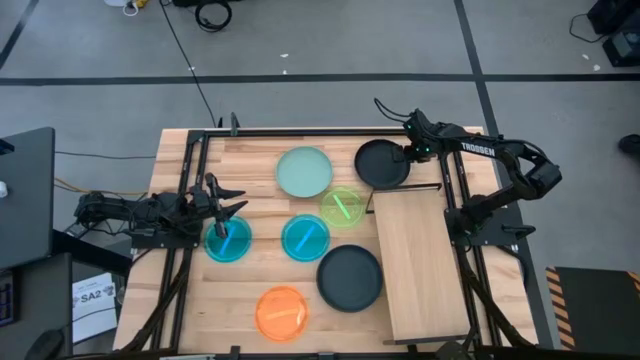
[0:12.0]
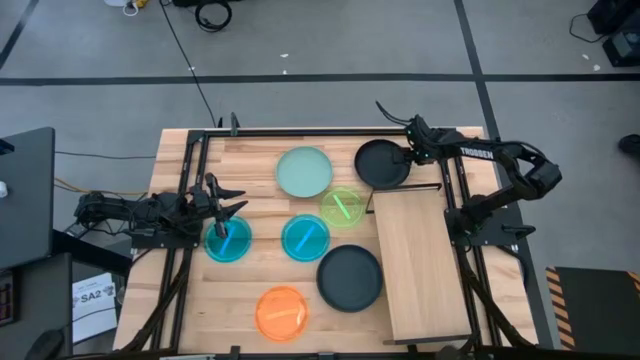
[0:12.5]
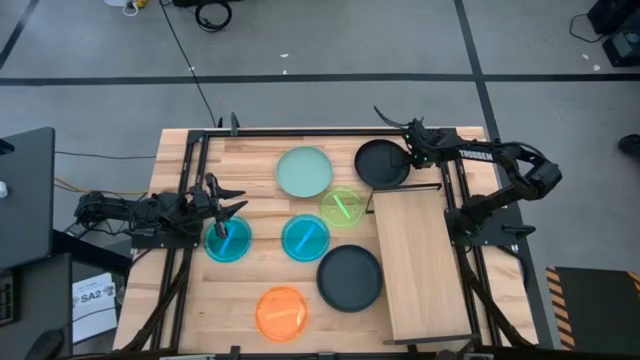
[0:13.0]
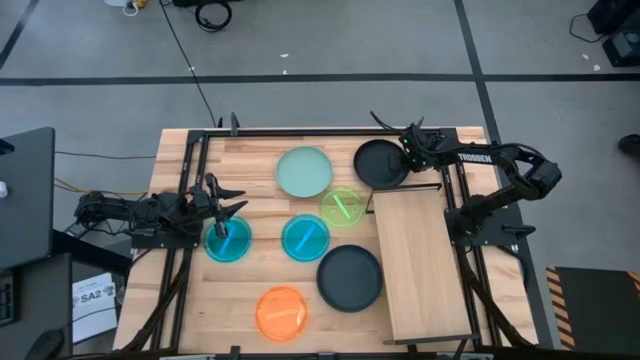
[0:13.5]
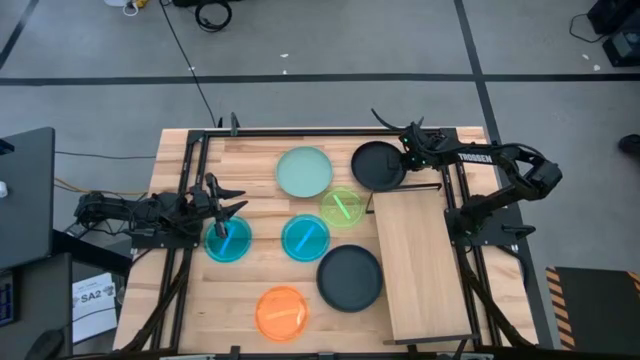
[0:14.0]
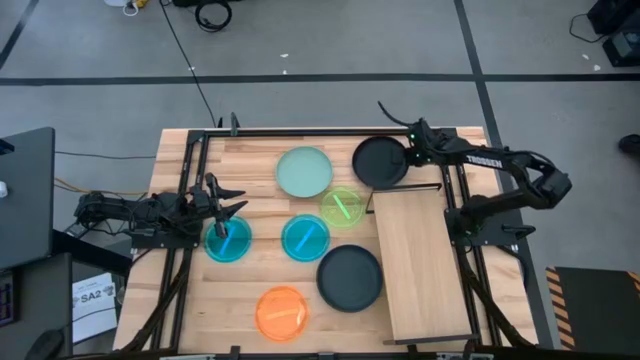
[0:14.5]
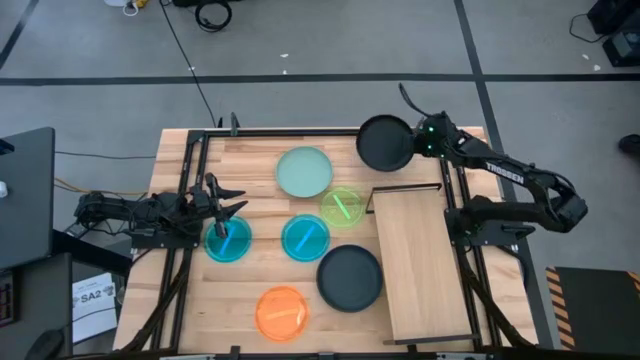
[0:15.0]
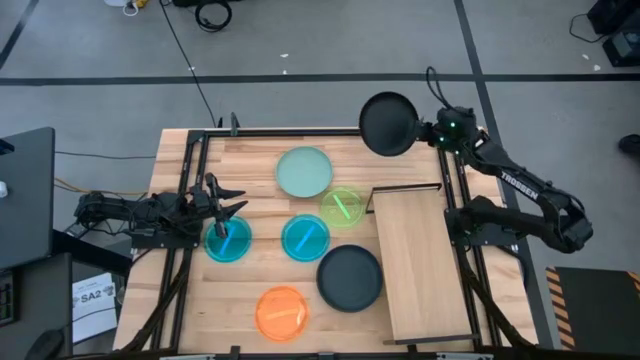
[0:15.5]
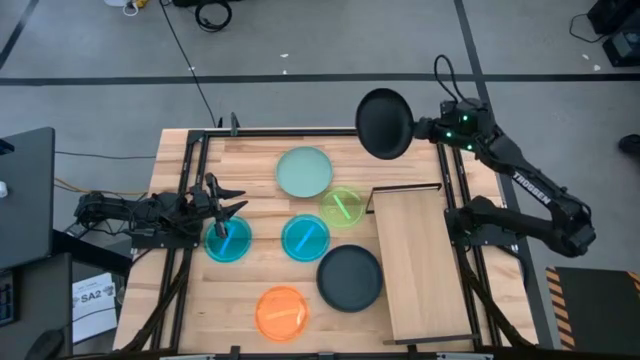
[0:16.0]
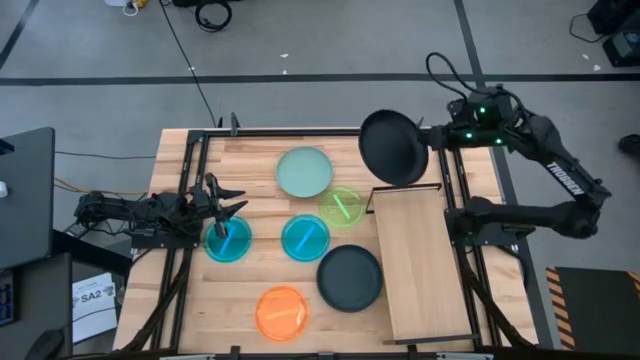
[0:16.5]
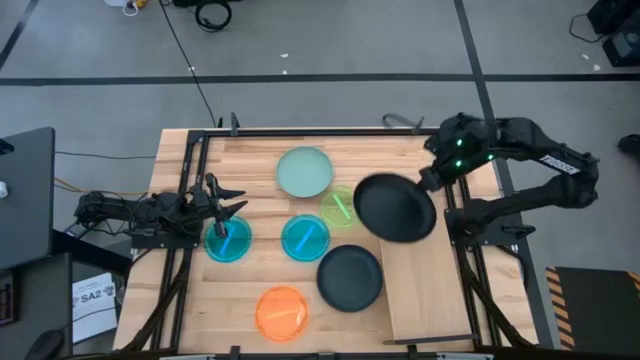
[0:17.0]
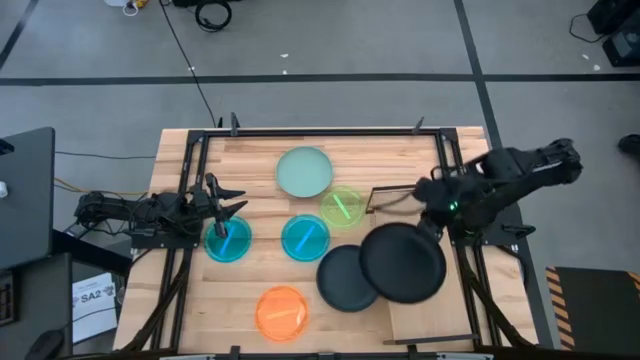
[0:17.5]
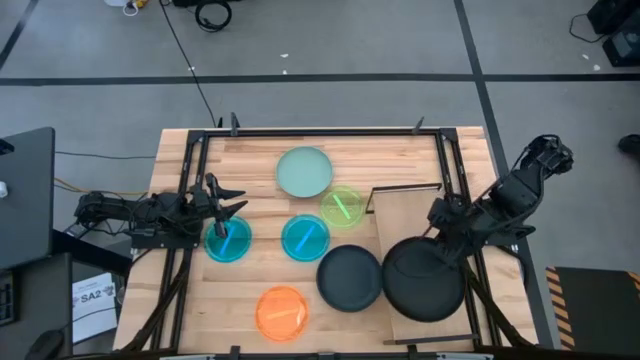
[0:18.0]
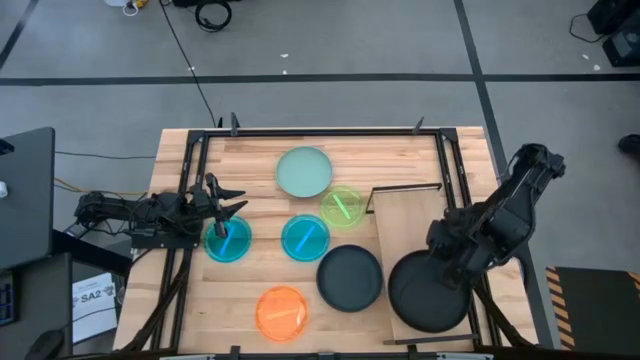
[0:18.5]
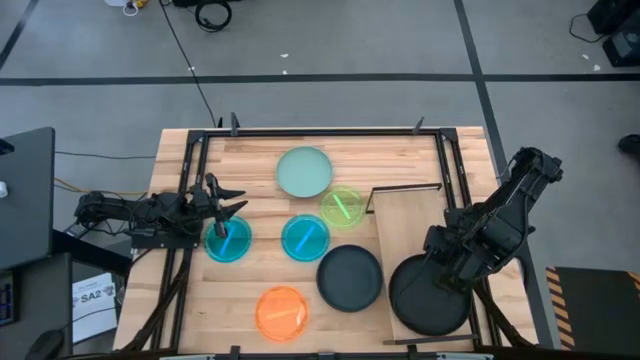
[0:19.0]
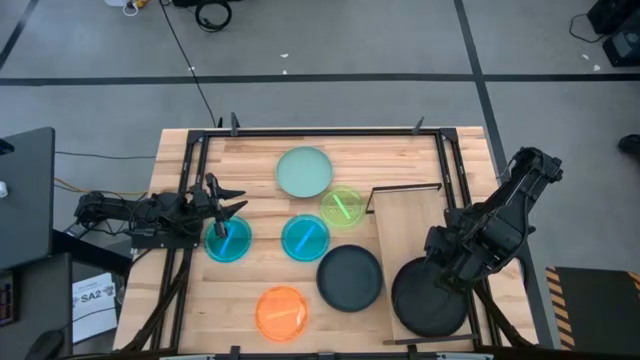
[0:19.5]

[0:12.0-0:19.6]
Task: Place and stack plates onto a shelf
Put the top black plate on the shelf

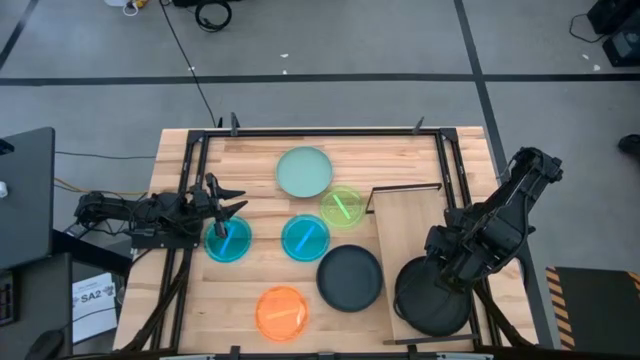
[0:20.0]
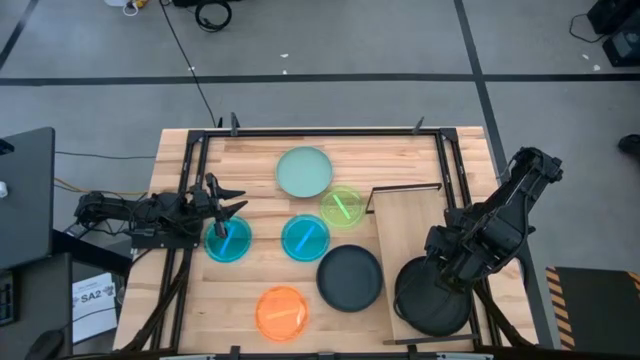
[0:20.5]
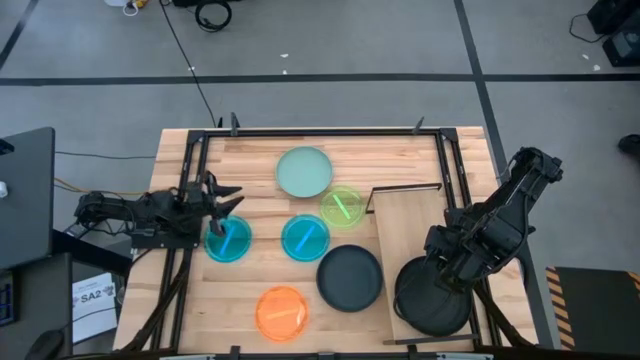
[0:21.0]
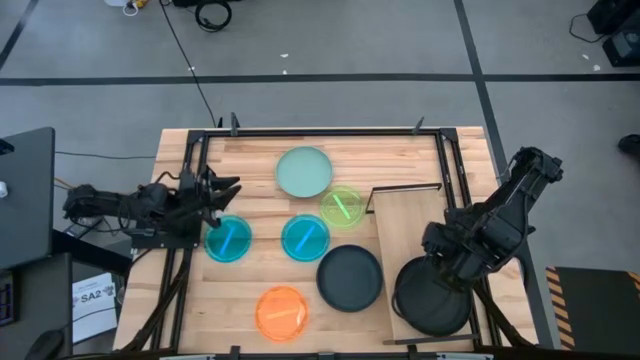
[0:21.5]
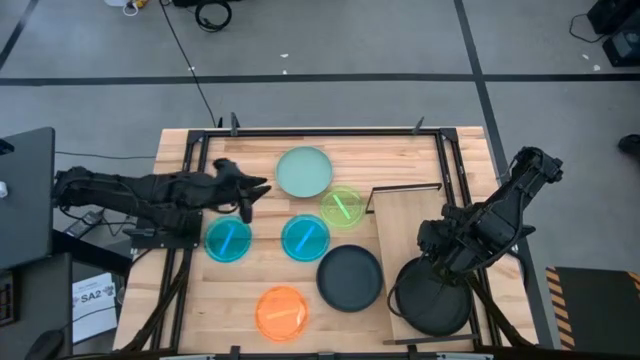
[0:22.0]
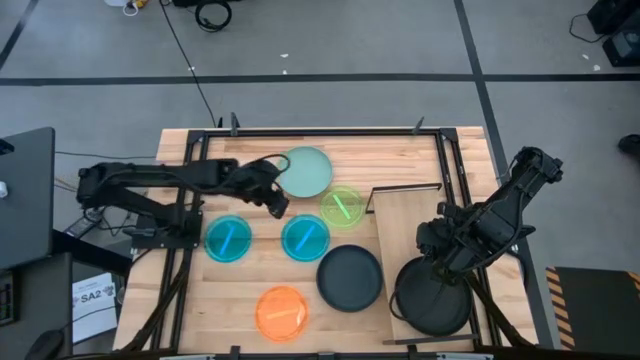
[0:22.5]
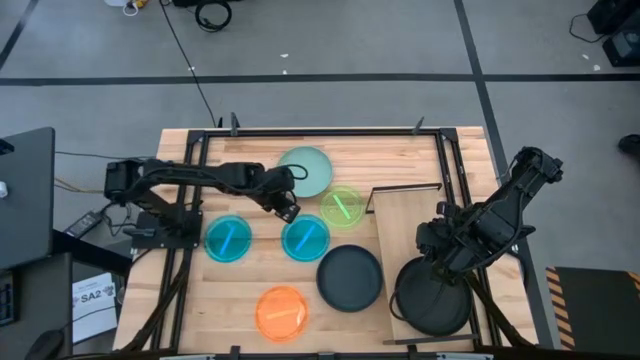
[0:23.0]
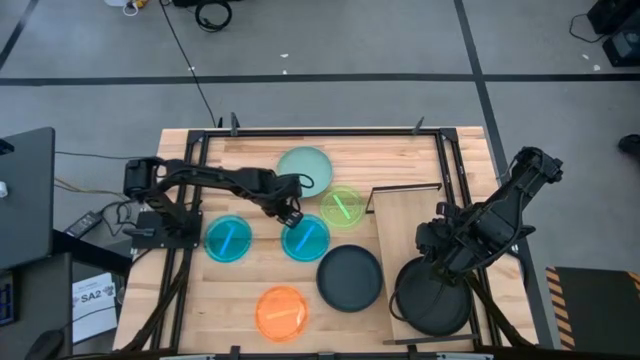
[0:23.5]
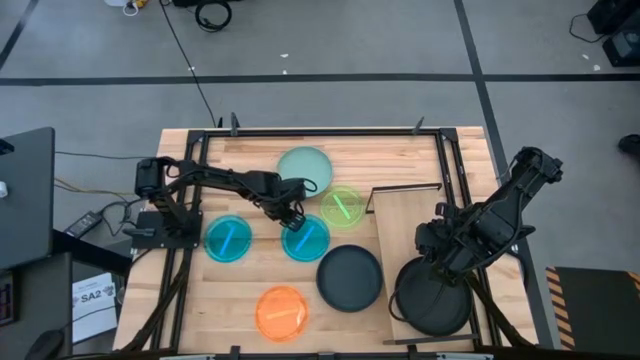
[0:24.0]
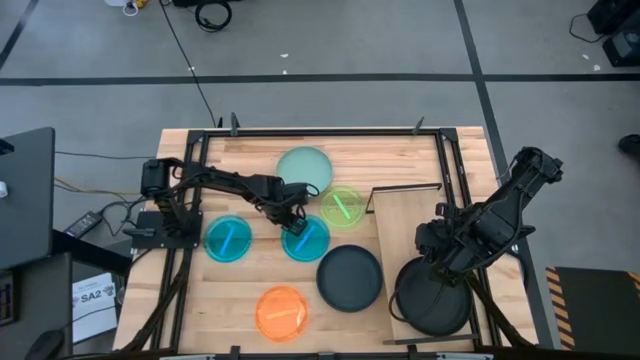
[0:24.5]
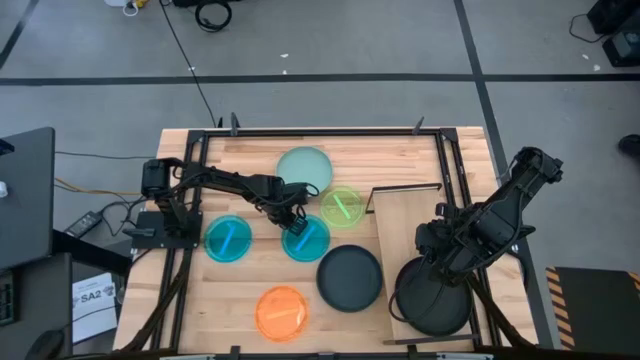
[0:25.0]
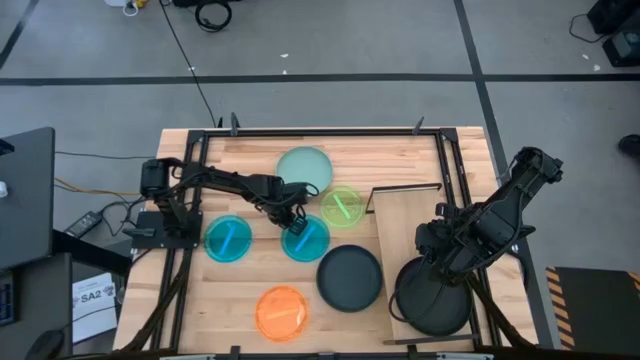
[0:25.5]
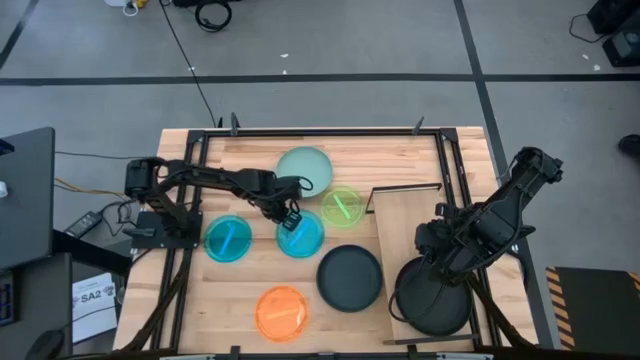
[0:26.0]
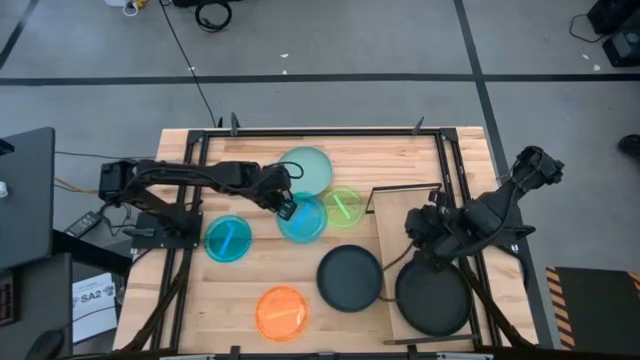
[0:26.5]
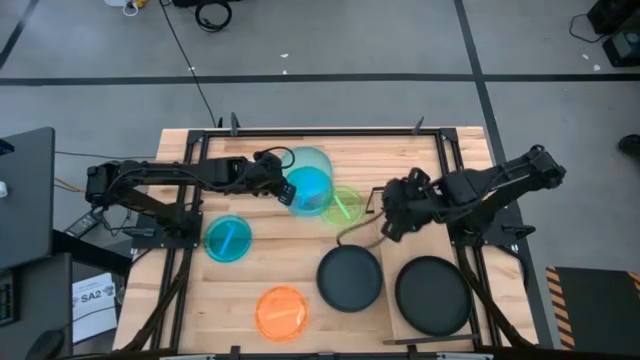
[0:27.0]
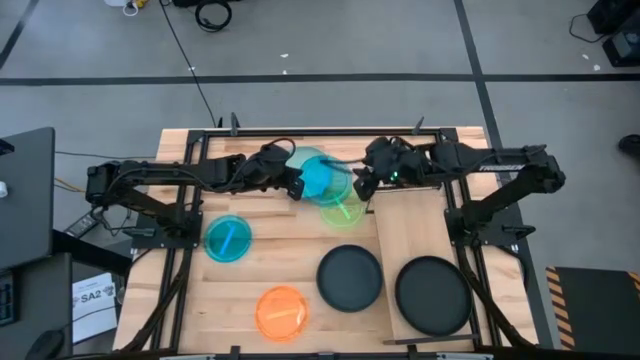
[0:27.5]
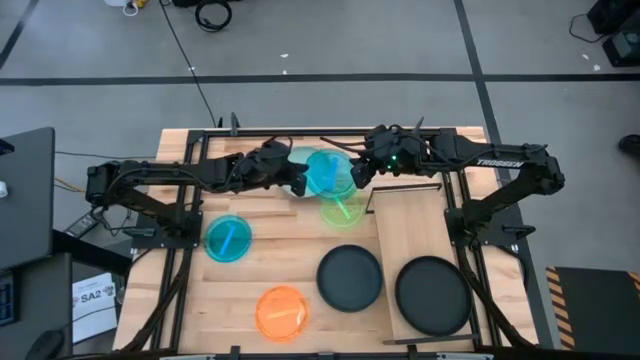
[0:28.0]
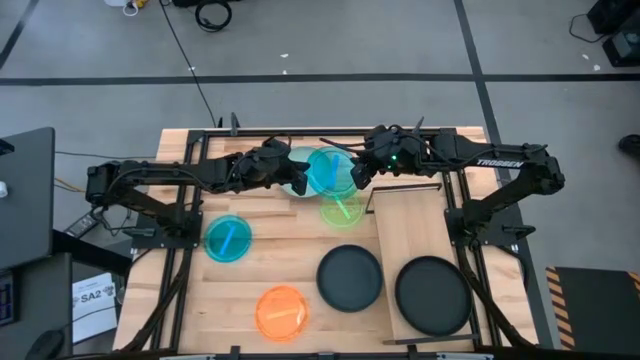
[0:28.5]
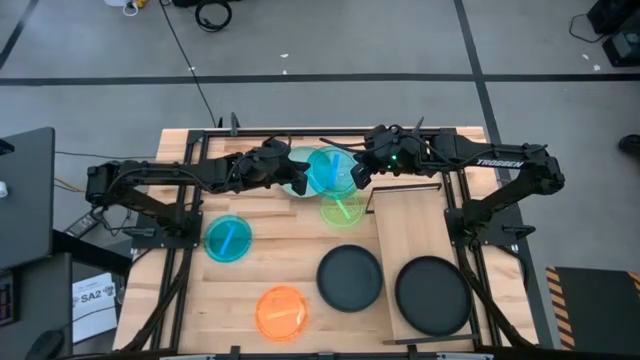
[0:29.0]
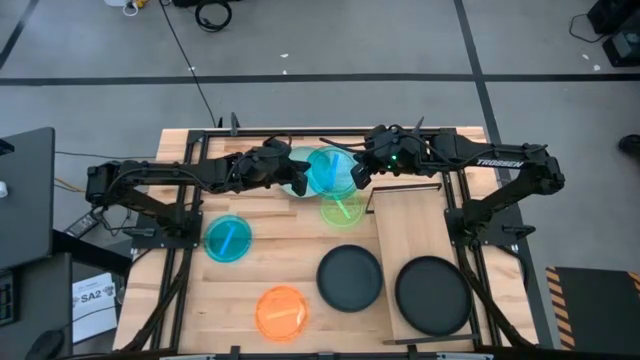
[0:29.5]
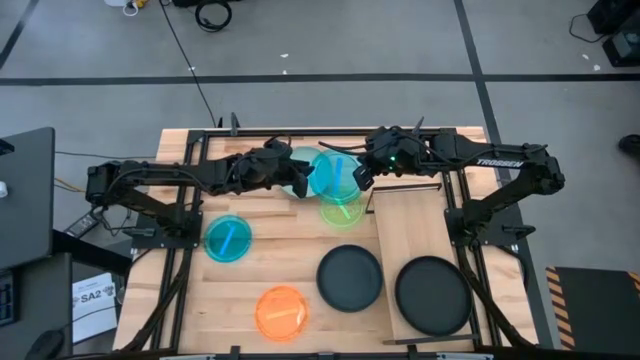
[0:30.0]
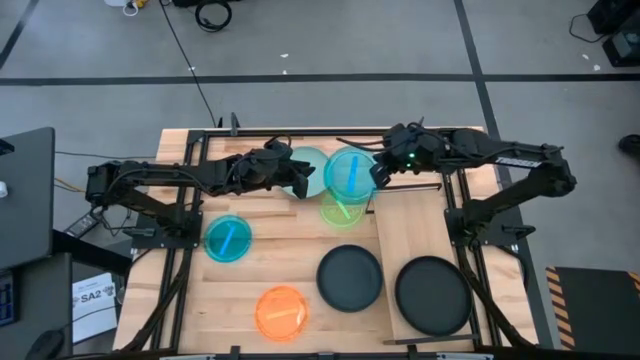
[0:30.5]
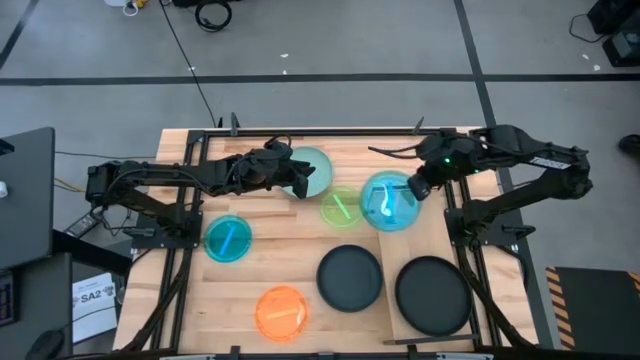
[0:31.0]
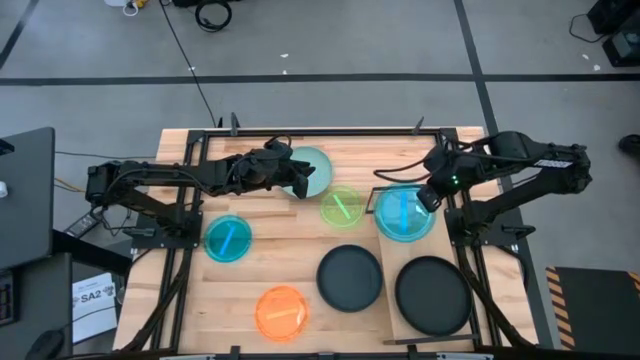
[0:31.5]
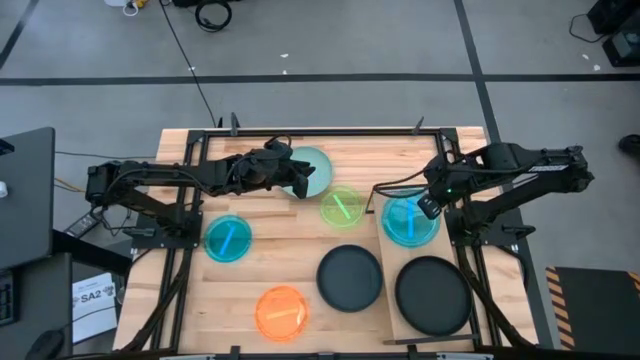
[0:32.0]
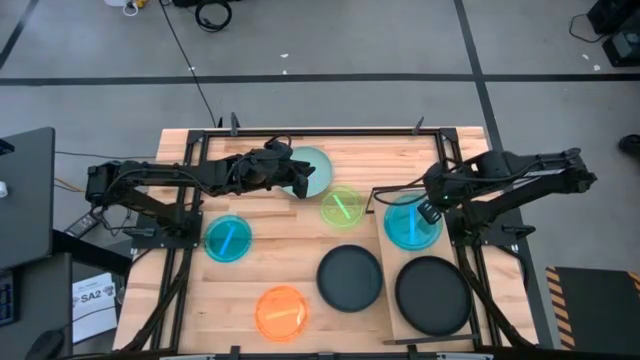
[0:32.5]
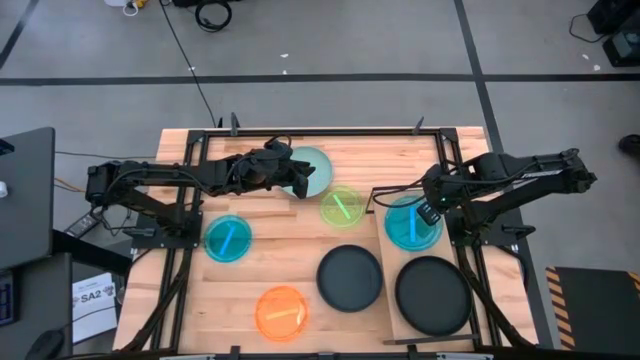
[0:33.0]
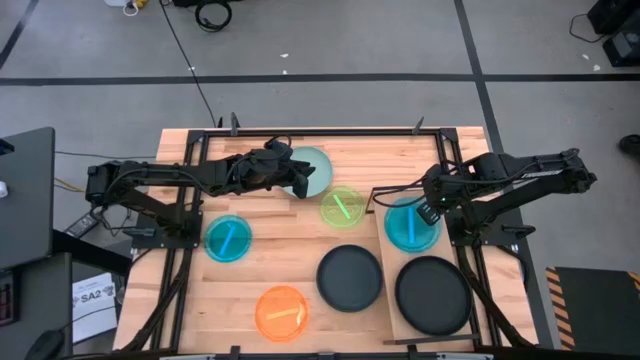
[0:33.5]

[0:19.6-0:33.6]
Put the right blue plate on the shelf
